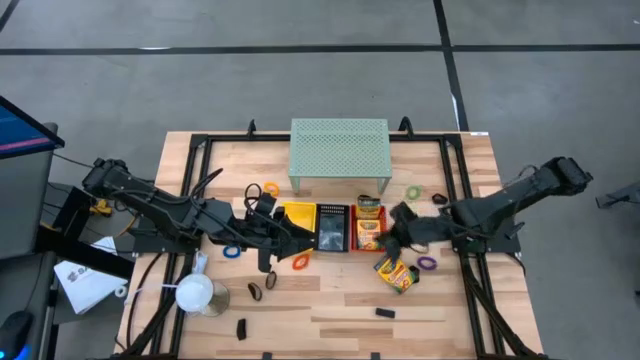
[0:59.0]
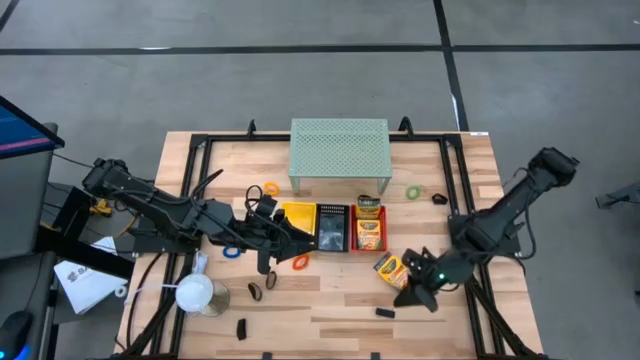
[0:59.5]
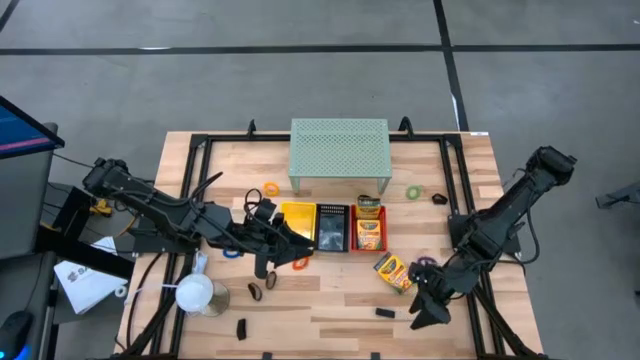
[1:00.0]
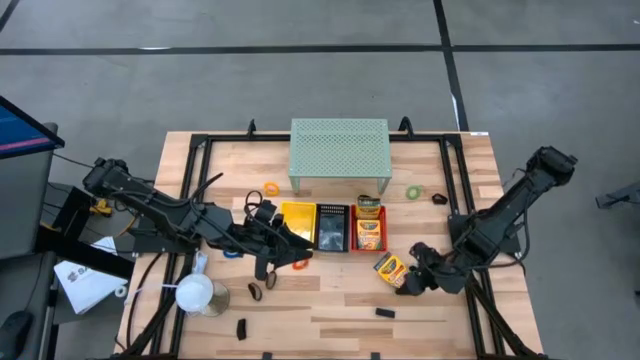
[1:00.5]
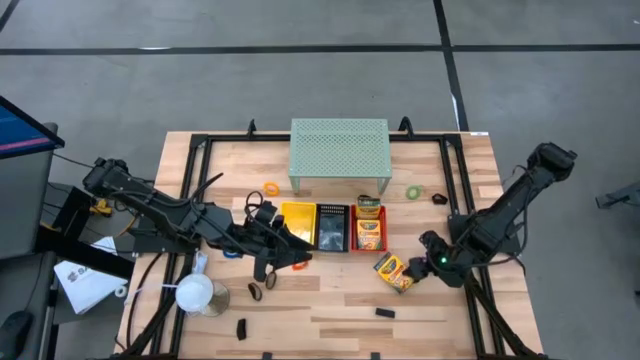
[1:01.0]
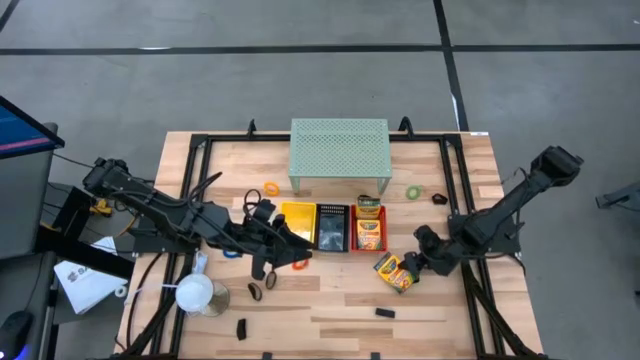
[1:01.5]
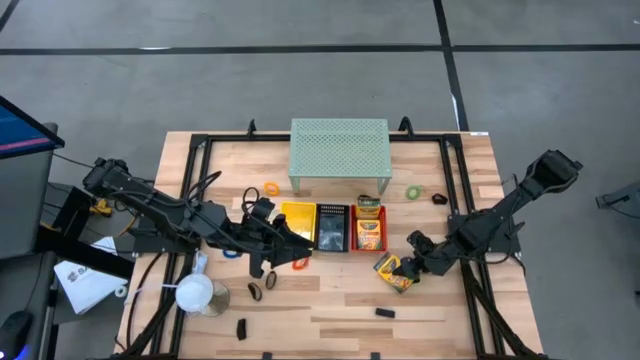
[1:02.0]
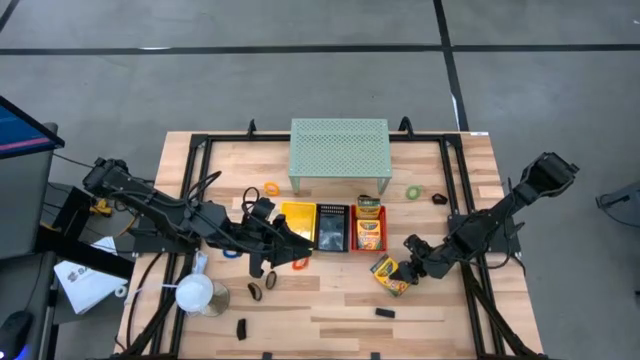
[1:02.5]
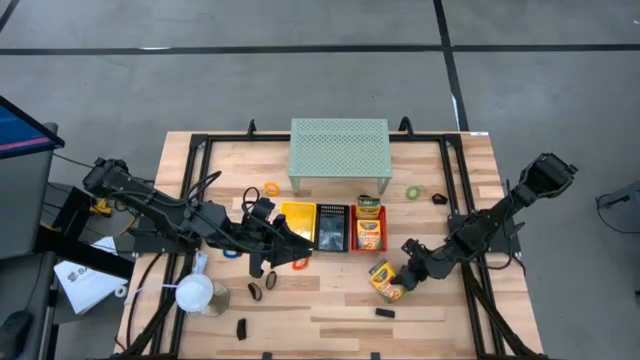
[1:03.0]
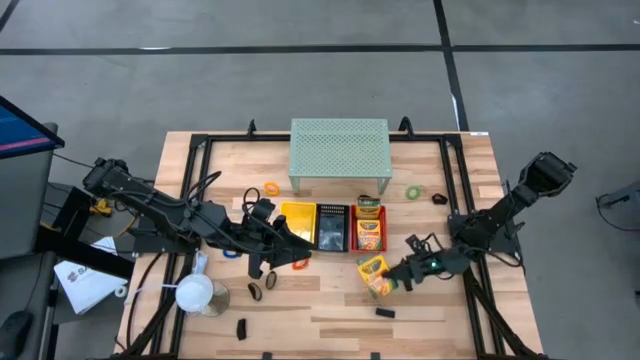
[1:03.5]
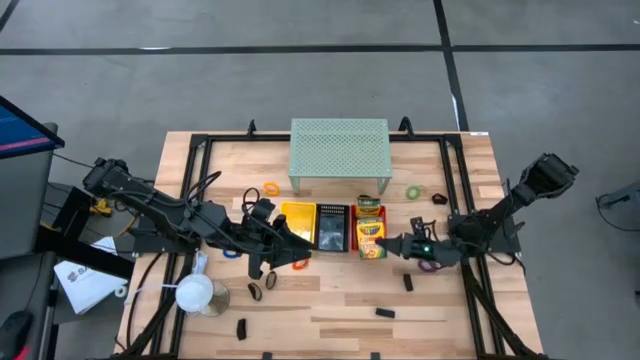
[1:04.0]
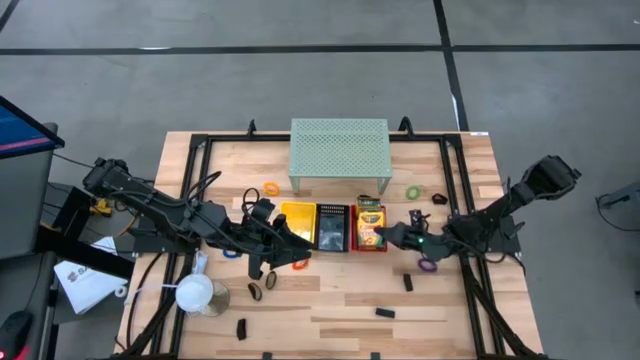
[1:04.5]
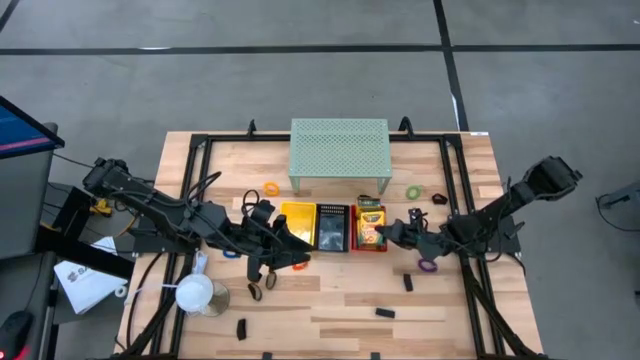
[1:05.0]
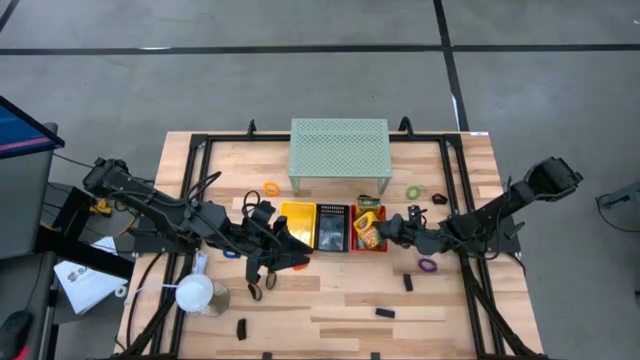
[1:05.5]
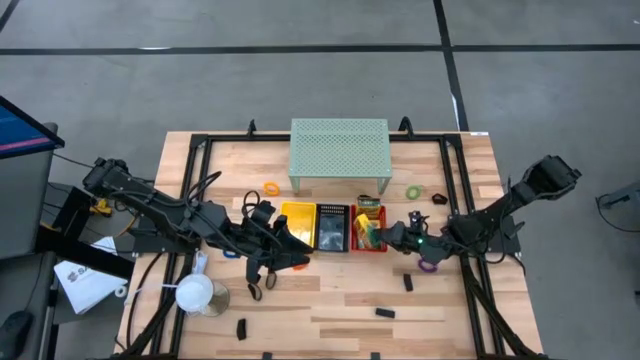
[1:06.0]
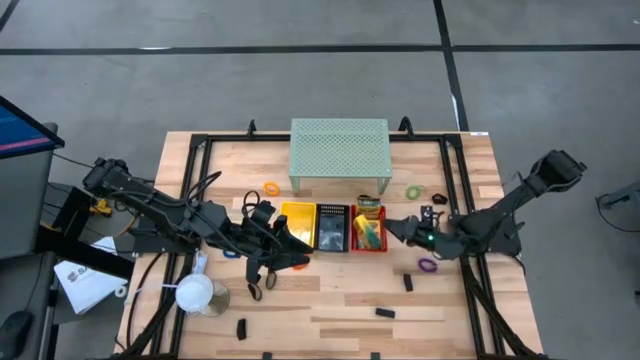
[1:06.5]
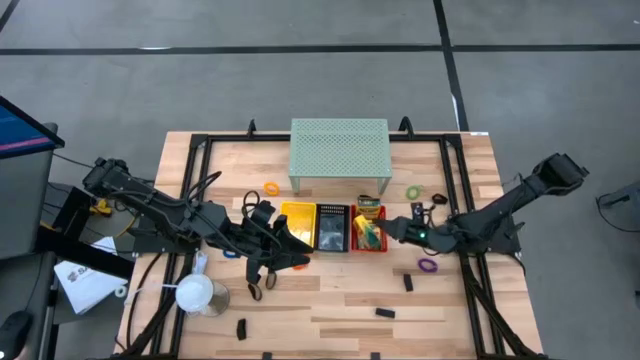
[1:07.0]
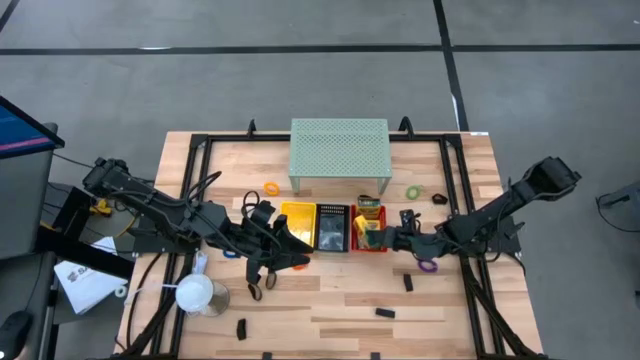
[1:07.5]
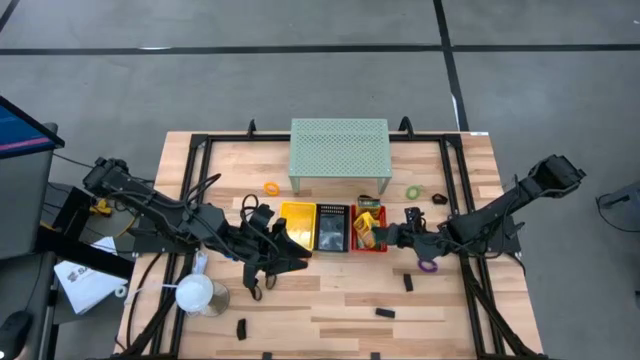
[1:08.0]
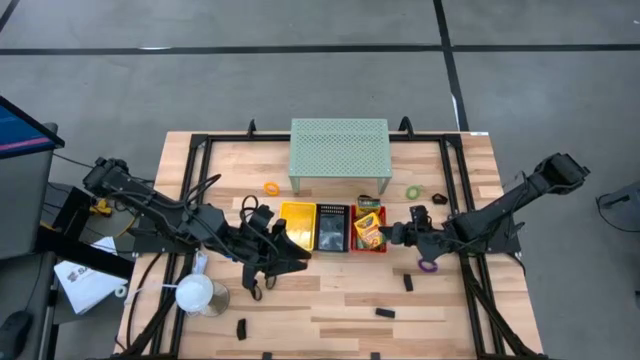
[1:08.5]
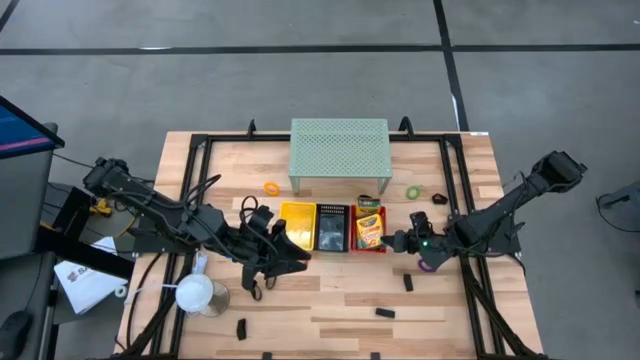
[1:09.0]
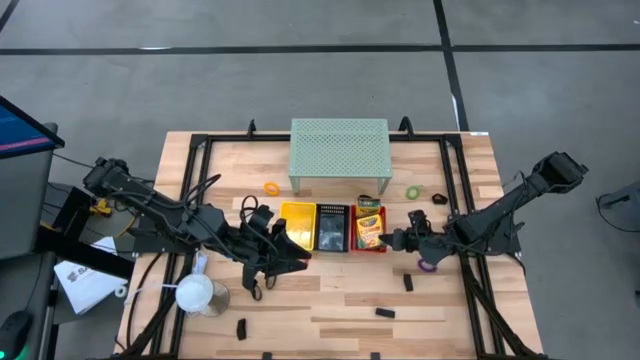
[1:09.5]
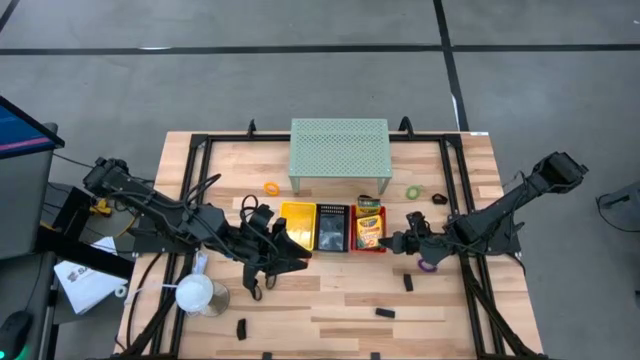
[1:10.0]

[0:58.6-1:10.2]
Task: Pick & Place Office Desk Supplies
Put the crayons box into the red bin

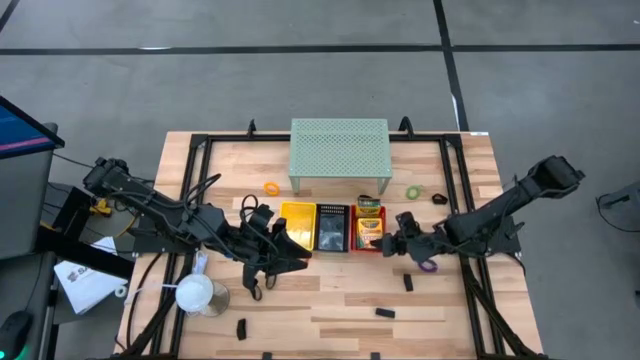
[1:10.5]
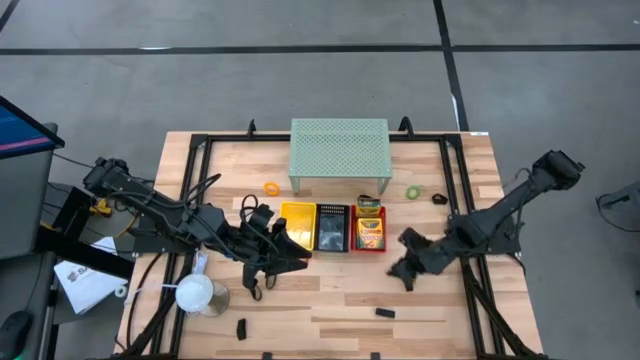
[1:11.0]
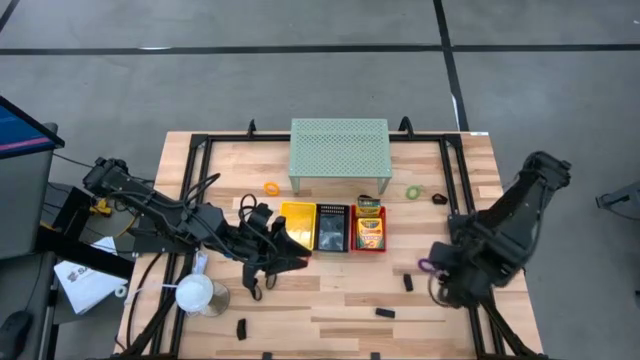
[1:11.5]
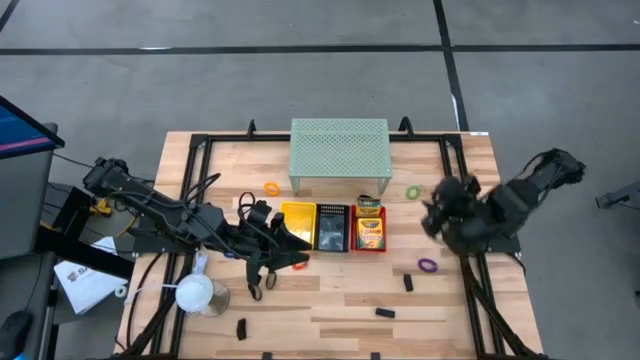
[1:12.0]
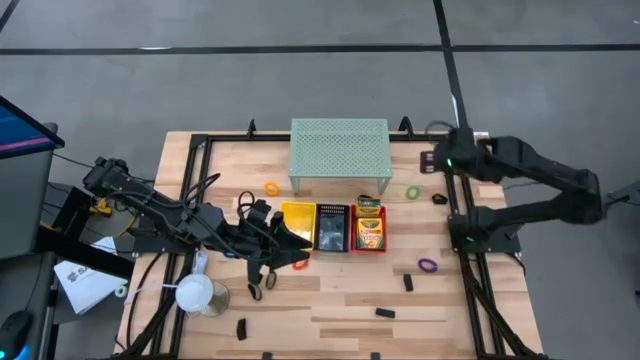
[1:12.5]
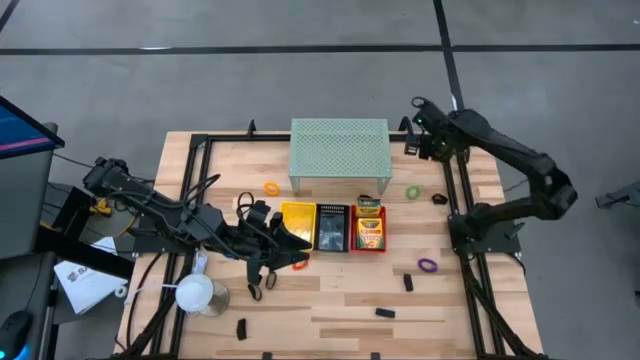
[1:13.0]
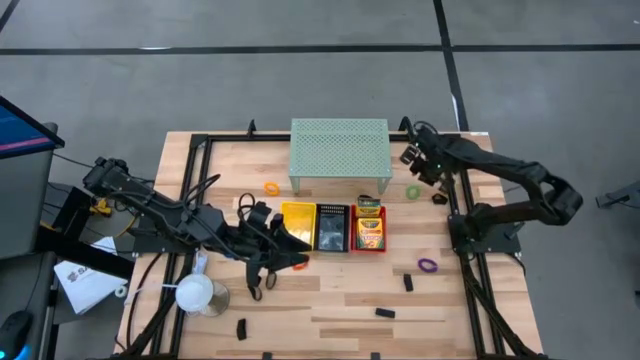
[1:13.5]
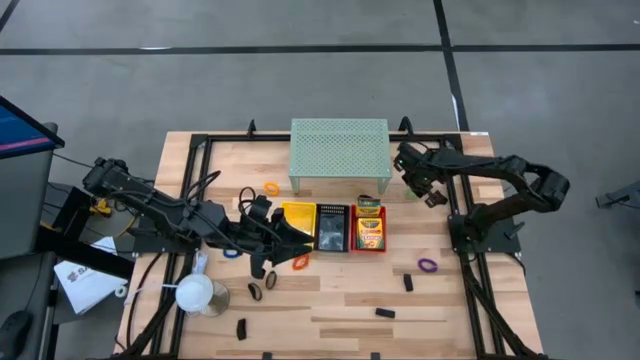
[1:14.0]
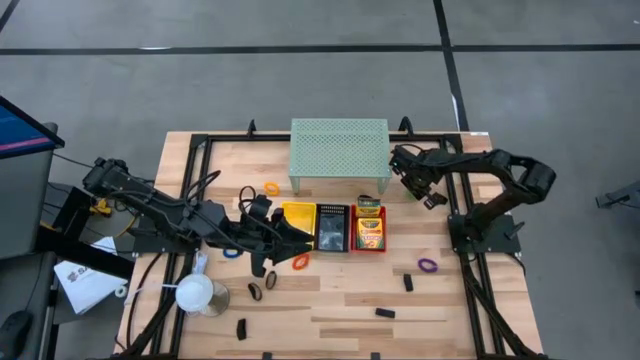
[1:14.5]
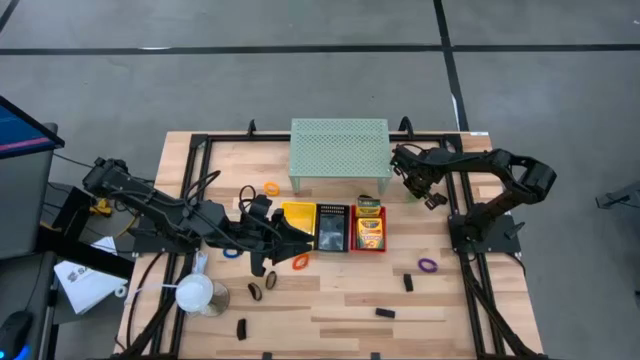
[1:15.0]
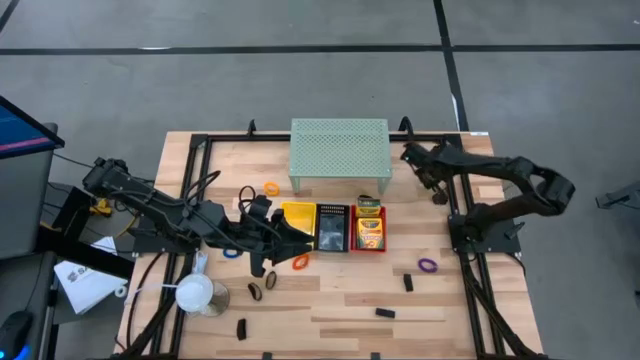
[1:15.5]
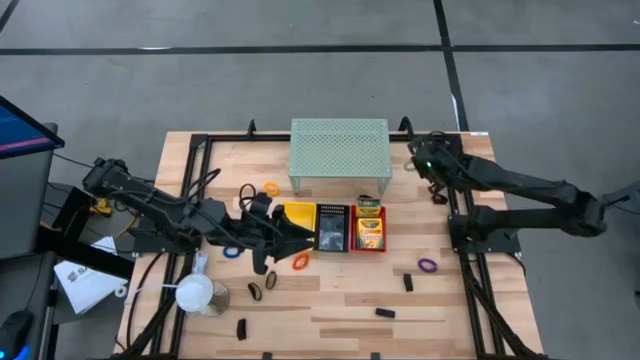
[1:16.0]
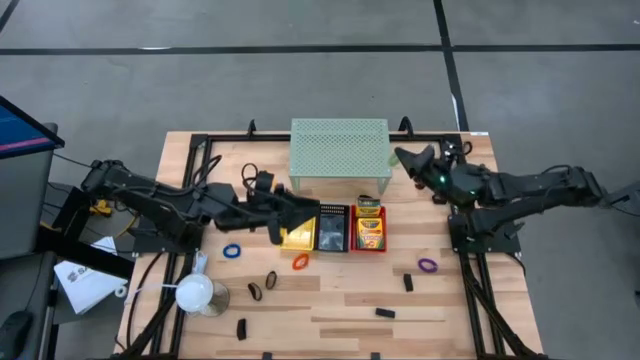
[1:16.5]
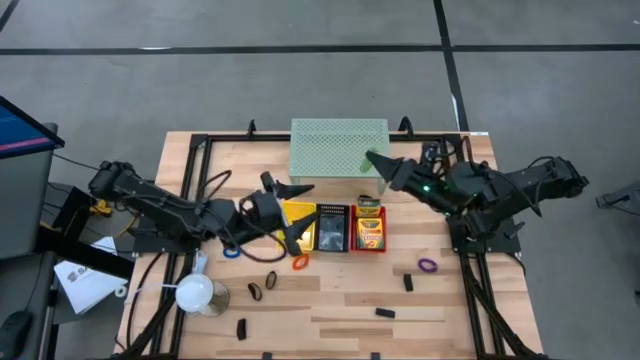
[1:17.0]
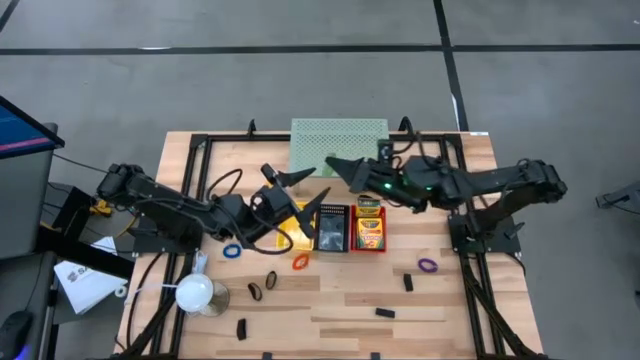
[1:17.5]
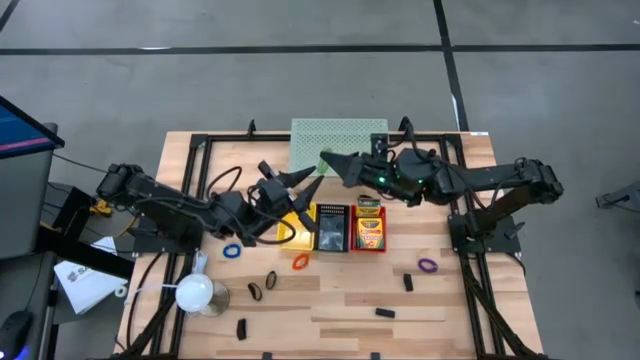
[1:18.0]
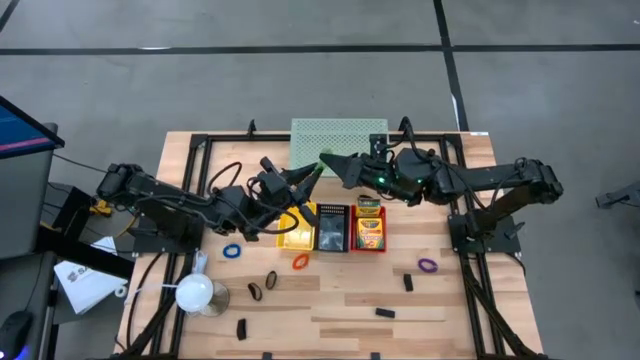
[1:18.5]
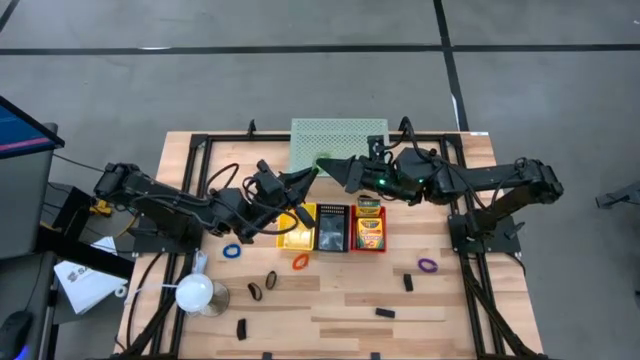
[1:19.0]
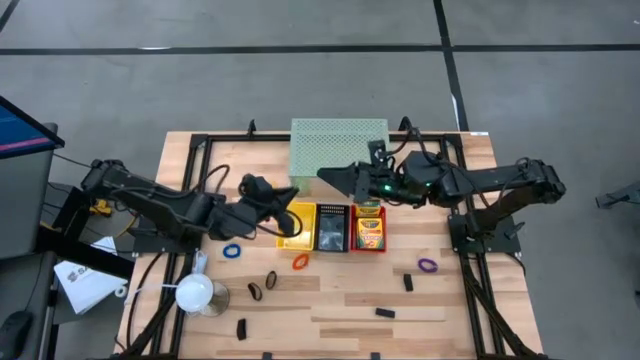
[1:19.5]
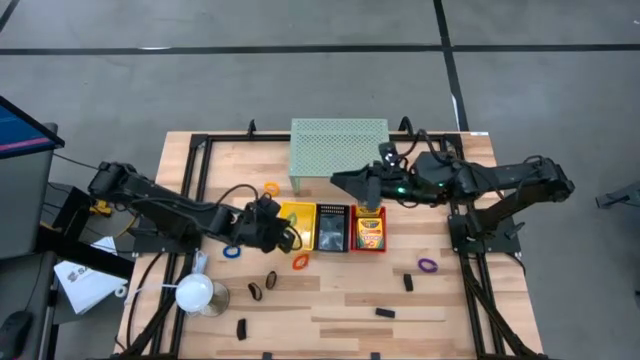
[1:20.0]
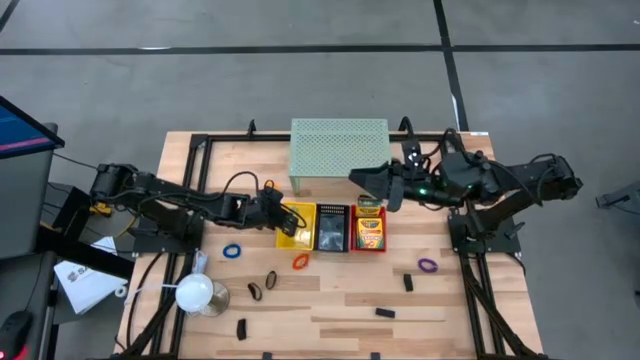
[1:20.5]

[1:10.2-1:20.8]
Put the green spring keychain into the yellow bin
